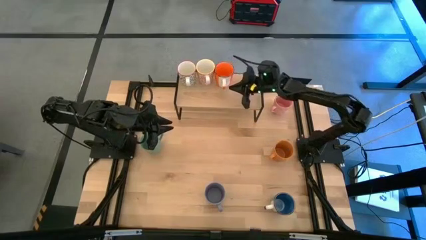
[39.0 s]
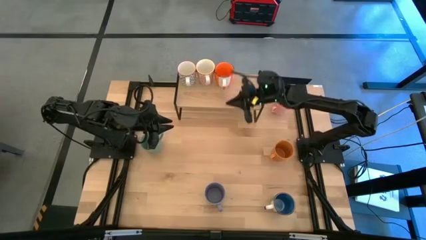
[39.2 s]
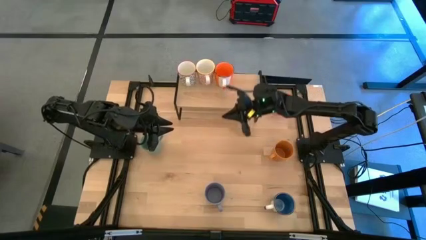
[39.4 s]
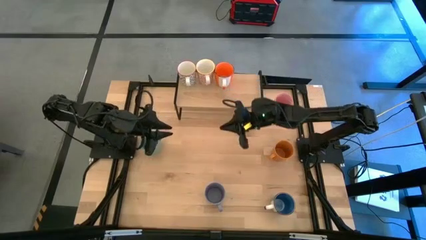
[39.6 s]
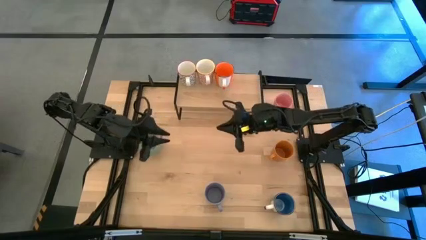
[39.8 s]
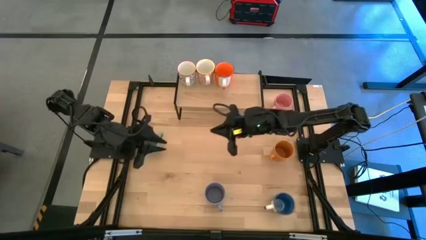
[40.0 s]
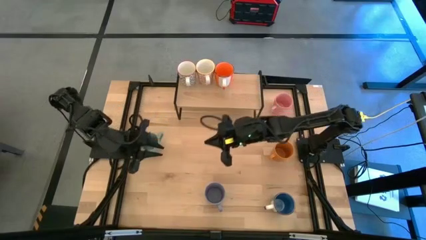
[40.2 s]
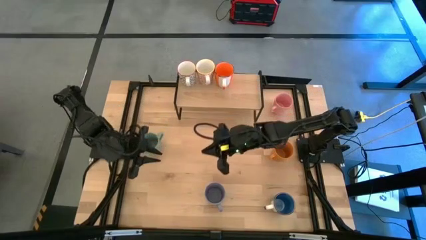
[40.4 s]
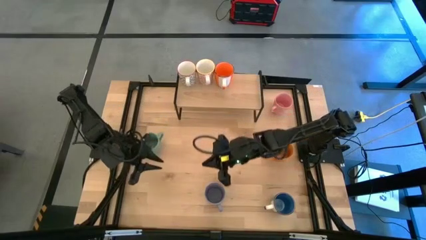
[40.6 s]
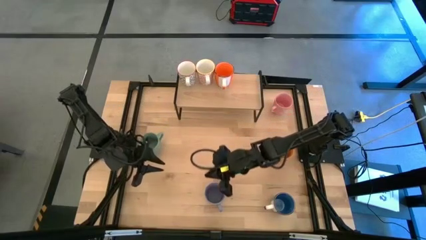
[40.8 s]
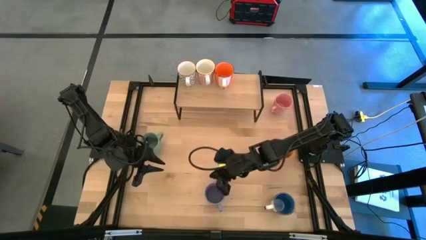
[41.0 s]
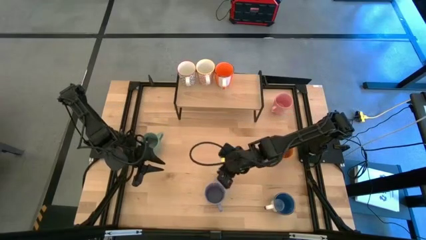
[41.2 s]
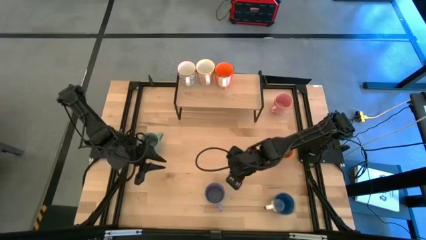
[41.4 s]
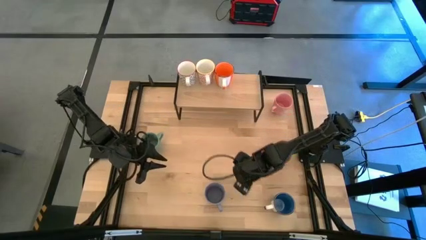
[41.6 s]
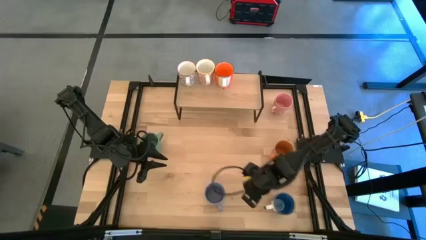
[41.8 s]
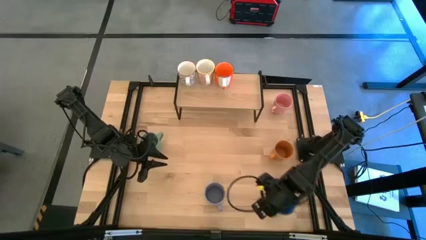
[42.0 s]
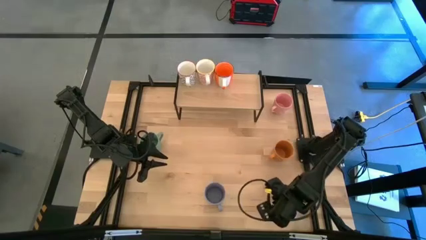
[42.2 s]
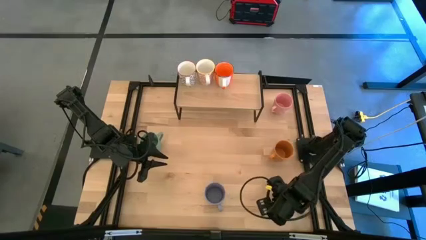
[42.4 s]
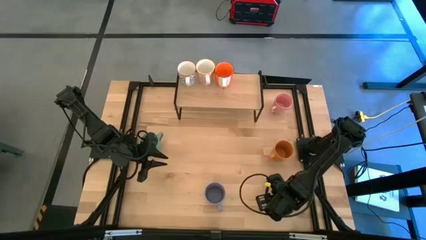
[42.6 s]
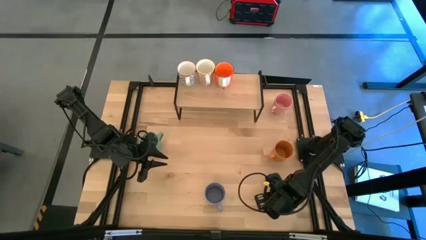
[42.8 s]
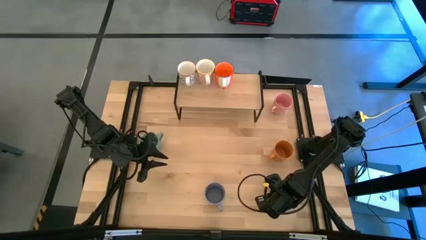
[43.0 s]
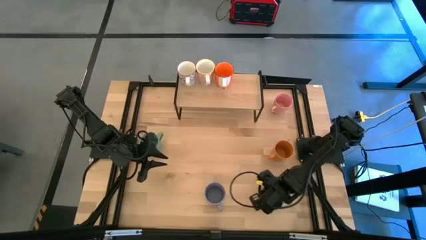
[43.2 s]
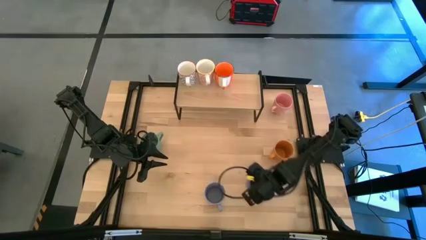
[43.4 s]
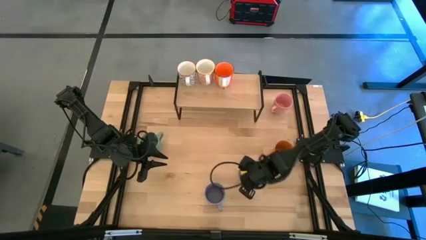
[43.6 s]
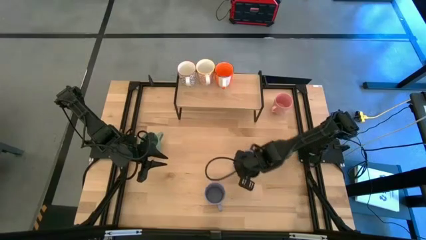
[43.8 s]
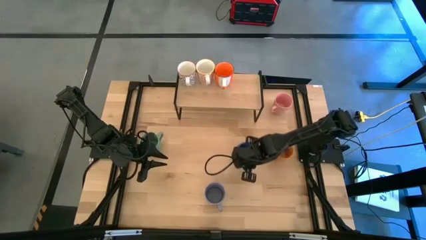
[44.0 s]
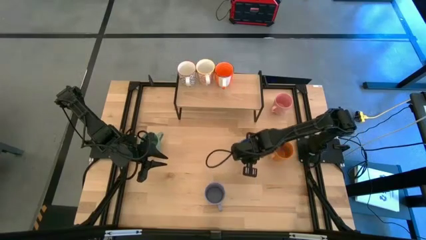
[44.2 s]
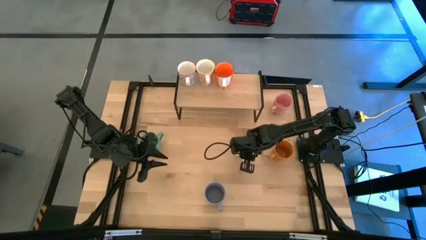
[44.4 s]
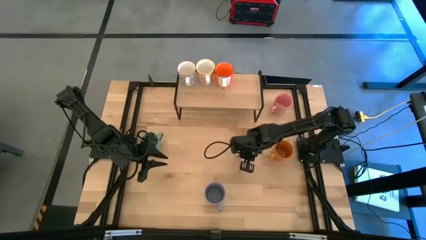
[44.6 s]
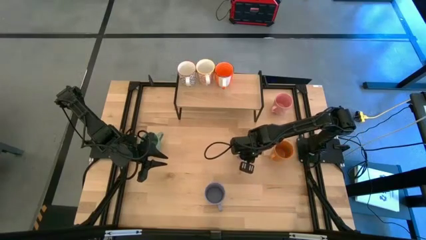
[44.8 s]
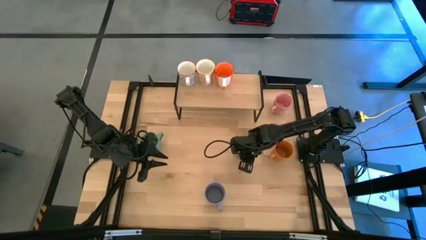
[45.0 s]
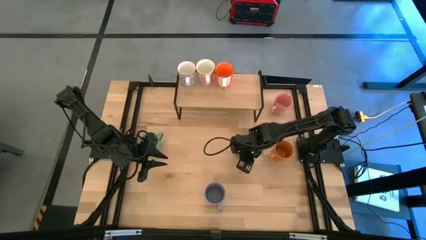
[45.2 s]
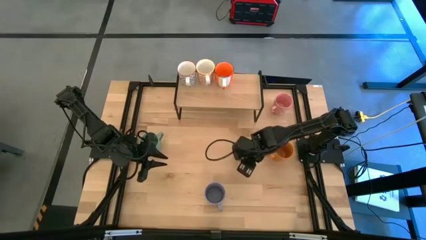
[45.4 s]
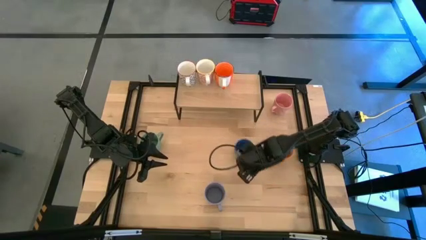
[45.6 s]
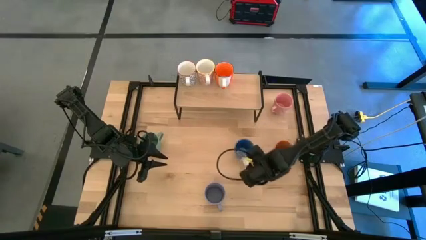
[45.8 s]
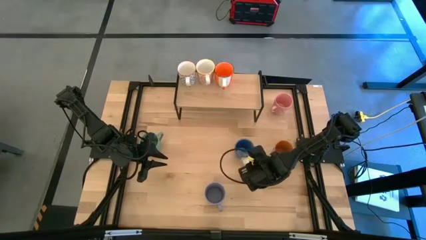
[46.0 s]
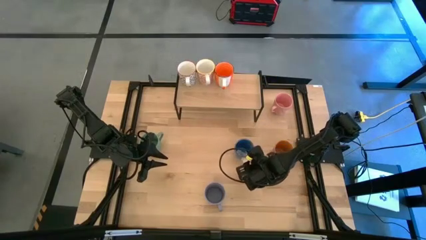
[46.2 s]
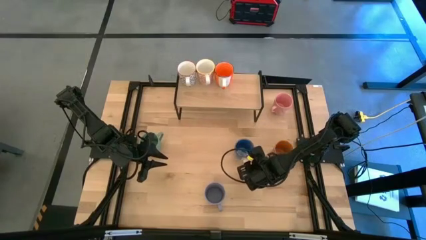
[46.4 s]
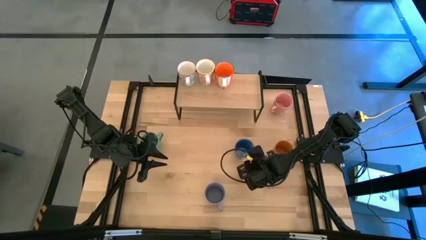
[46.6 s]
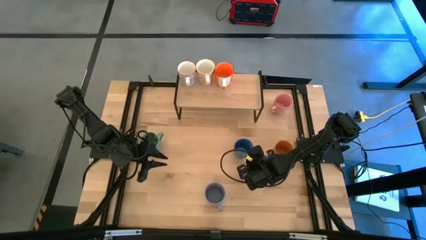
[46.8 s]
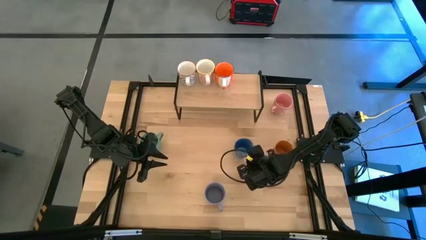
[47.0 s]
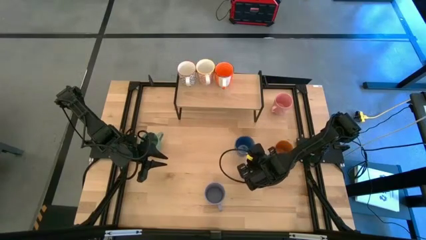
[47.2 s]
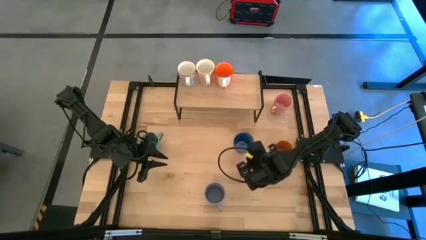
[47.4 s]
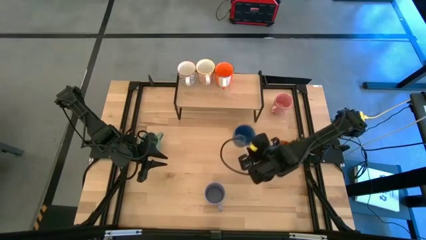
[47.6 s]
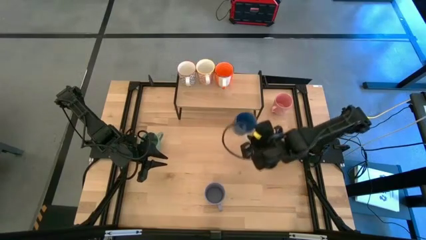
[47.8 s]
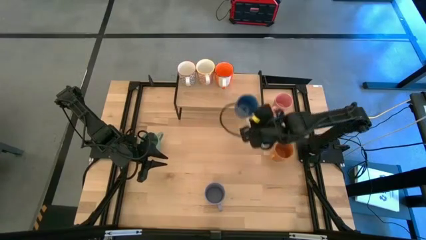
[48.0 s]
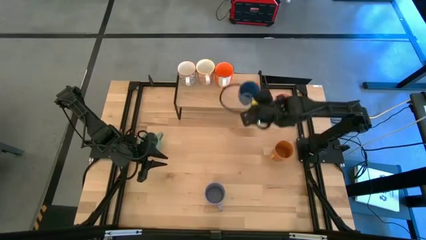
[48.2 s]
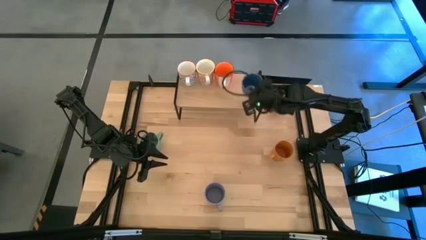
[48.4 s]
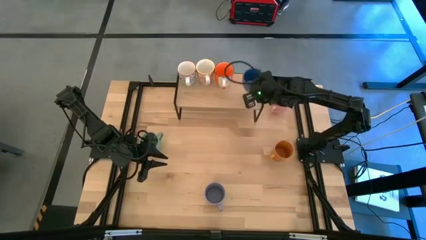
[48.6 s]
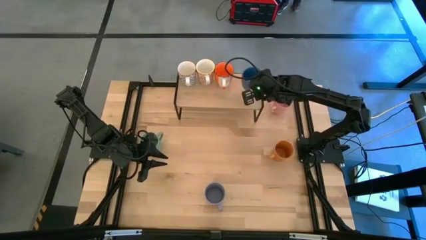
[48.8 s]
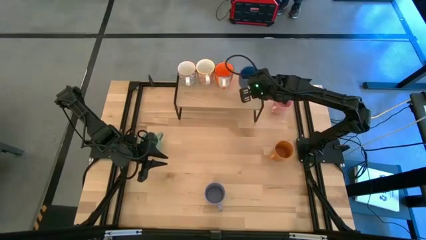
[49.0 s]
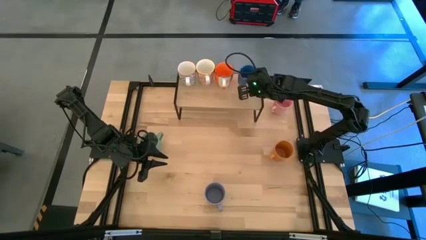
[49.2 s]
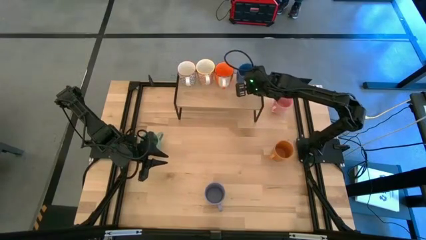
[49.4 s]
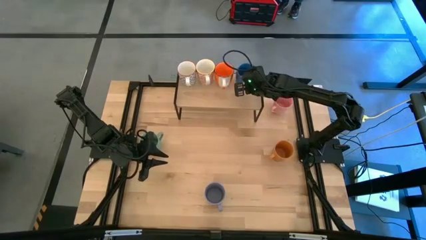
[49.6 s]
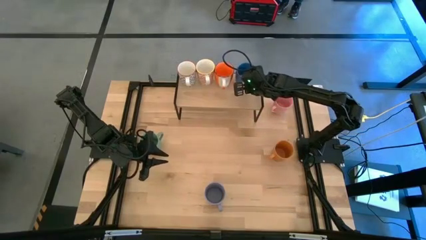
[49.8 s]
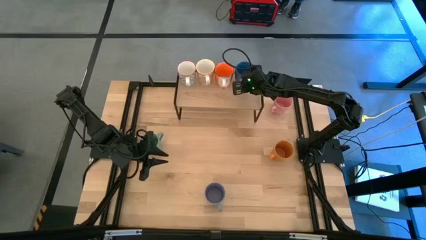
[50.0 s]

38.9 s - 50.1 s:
Task: Place coffee mugs
Put the blue mug on the shelf

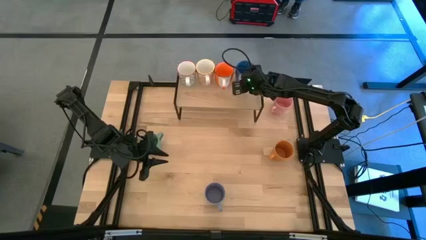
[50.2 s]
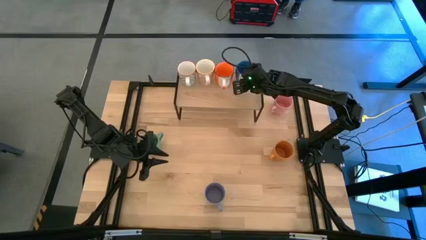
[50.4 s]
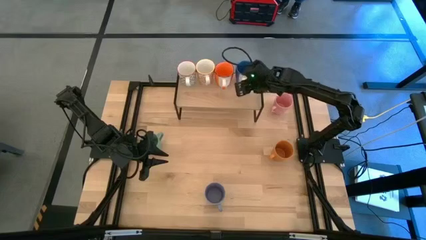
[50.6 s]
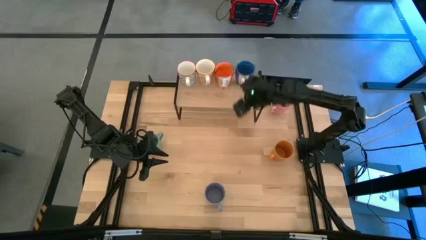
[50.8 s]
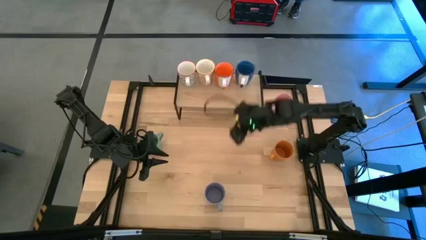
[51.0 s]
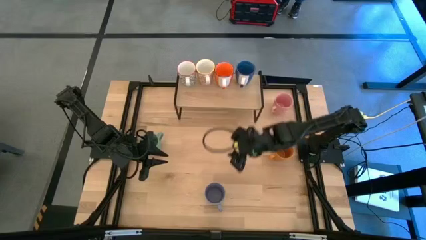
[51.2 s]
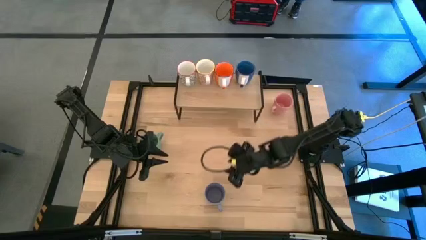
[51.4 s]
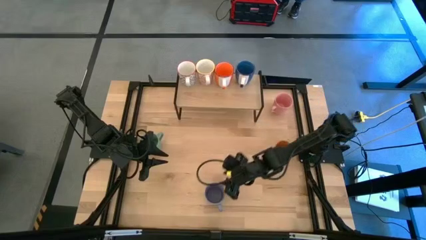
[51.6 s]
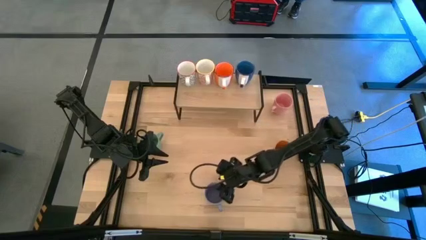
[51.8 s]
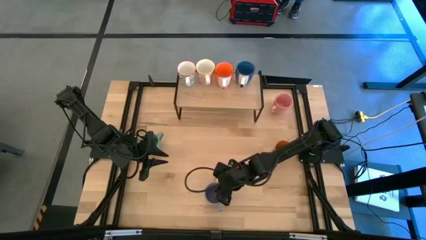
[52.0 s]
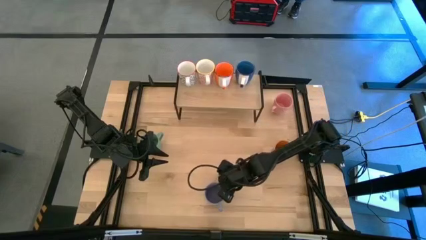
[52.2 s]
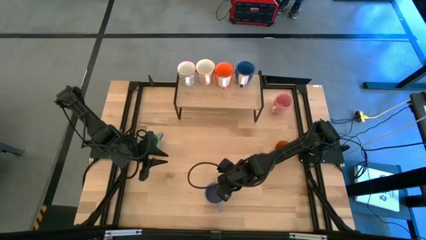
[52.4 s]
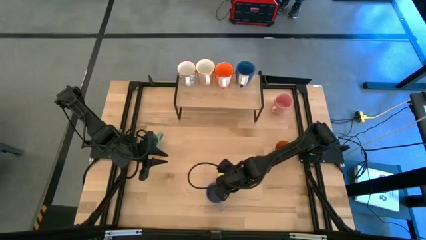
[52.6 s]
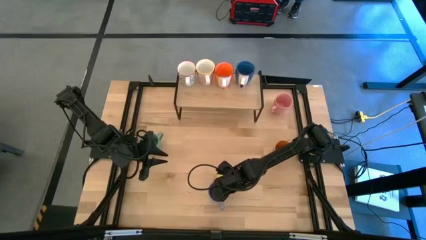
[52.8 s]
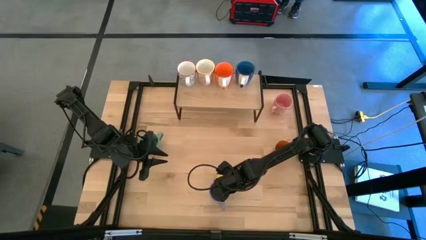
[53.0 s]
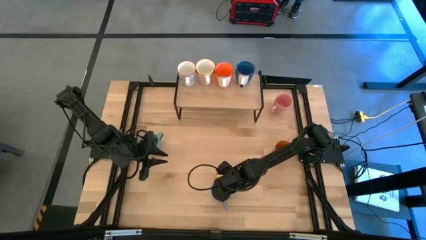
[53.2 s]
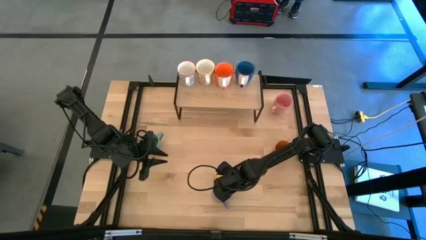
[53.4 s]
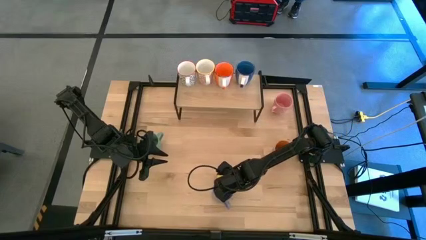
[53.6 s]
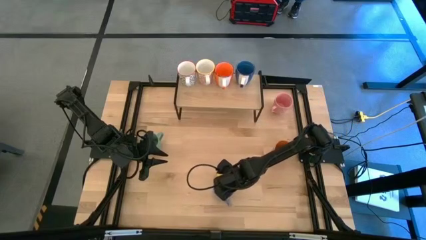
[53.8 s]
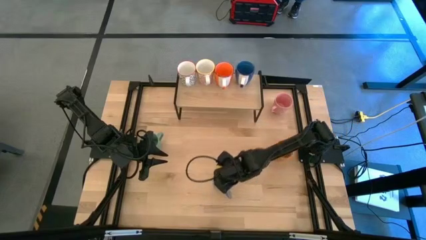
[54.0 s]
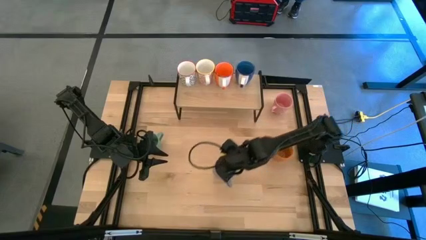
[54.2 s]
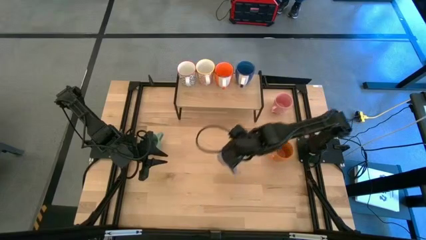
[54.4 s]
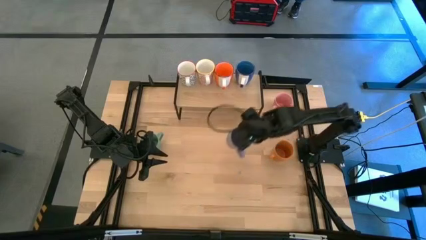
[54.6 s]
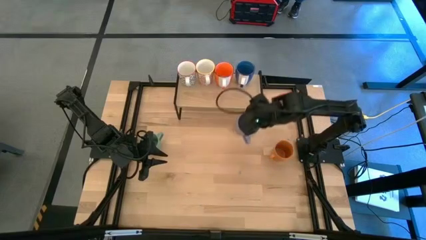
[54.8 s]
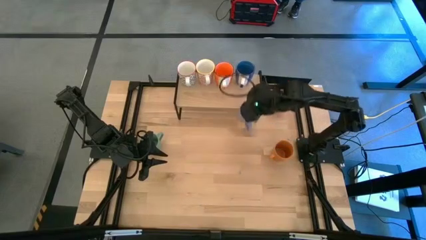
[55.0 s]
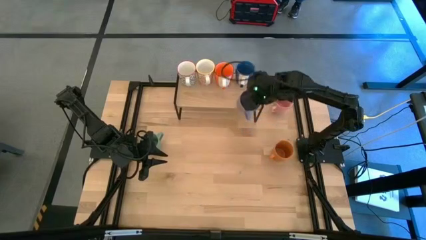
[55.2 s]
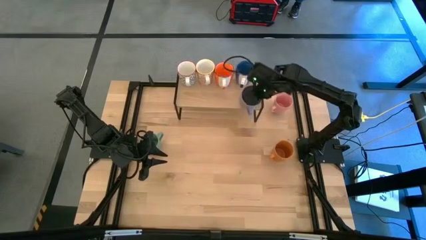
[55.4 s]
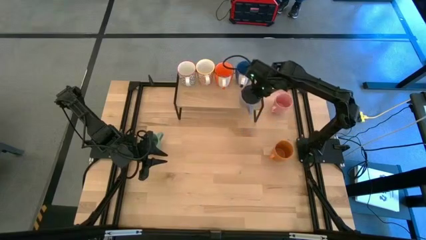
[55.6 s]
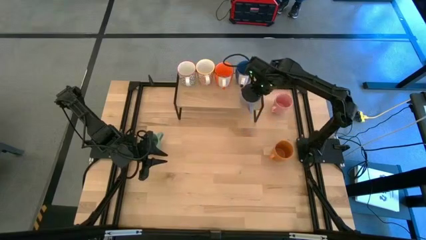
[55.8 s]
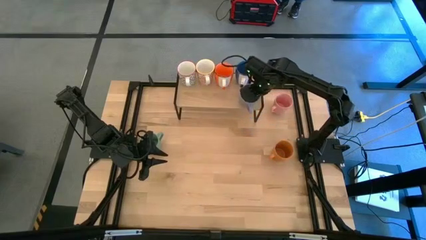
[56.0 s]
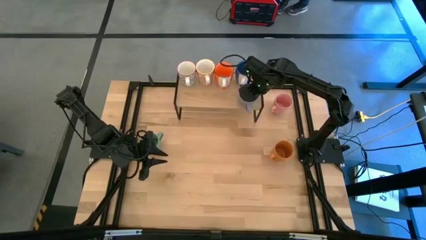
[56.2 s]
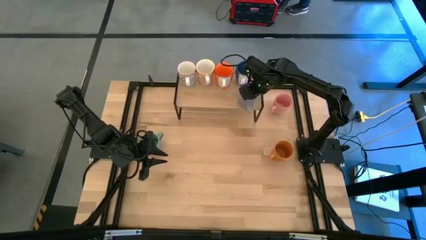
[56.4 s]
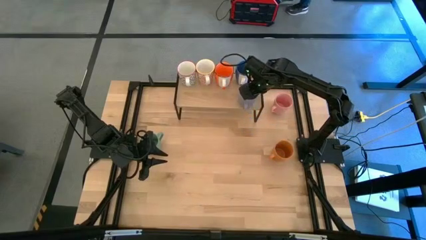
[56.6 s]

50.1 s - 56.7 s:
Put the purple mug on the shelf
